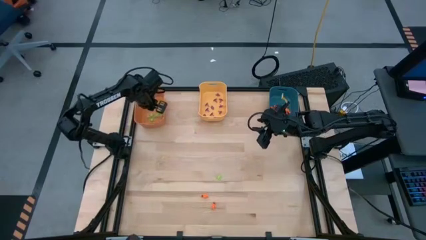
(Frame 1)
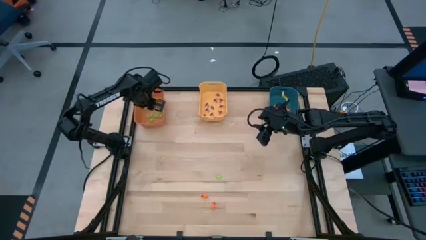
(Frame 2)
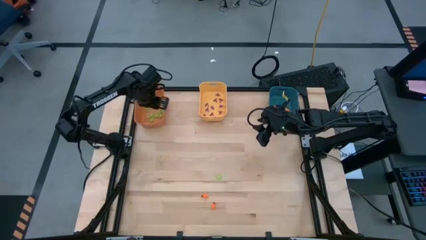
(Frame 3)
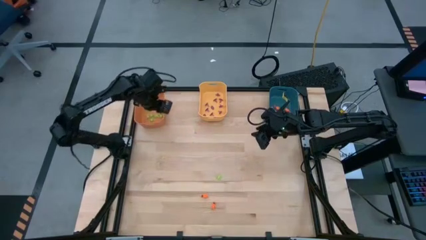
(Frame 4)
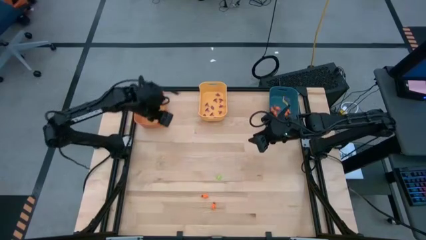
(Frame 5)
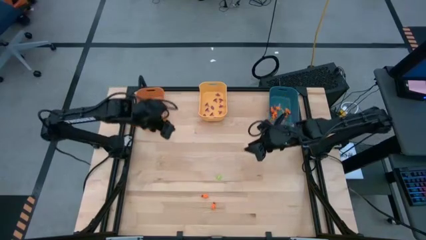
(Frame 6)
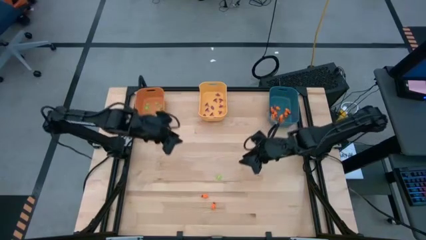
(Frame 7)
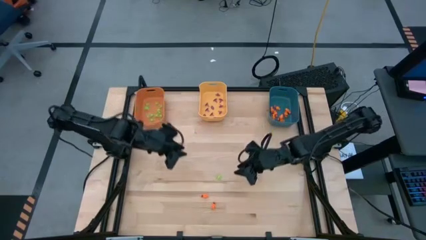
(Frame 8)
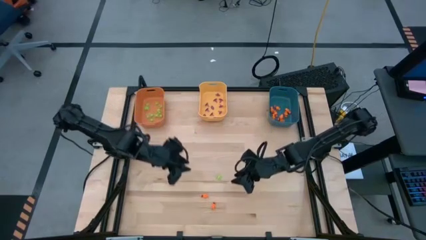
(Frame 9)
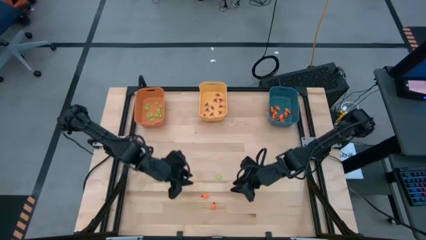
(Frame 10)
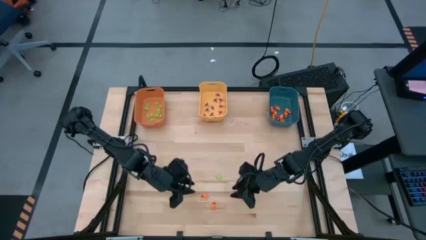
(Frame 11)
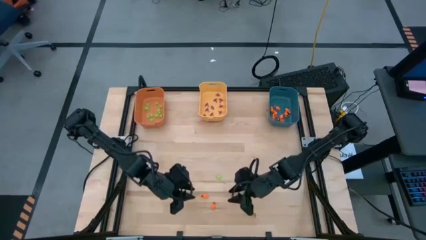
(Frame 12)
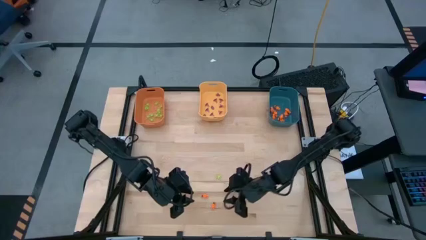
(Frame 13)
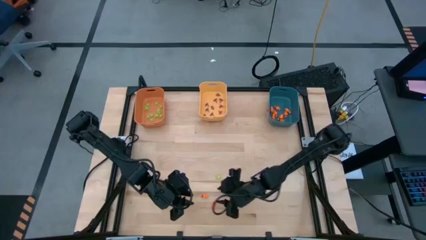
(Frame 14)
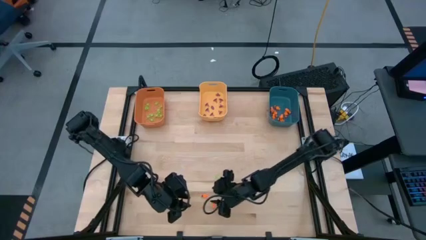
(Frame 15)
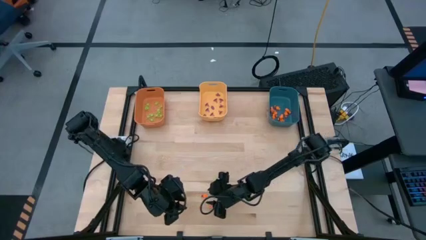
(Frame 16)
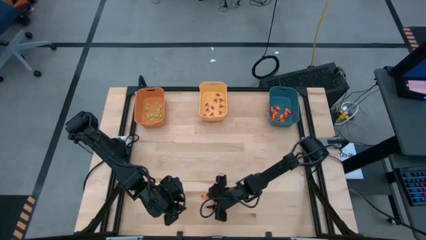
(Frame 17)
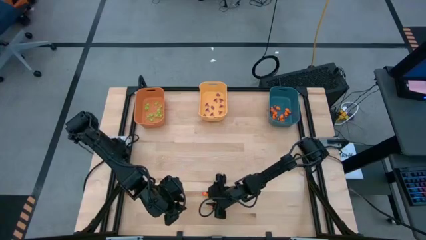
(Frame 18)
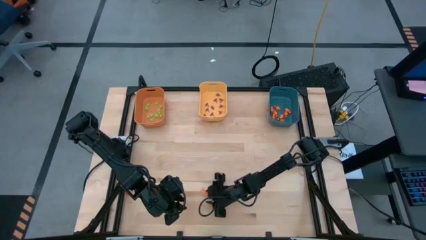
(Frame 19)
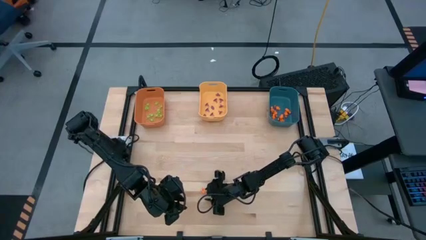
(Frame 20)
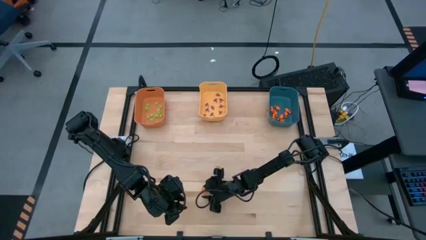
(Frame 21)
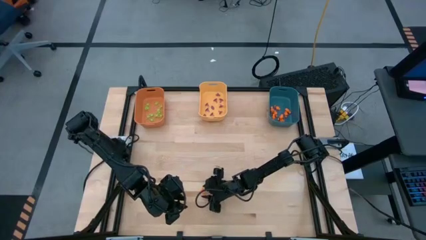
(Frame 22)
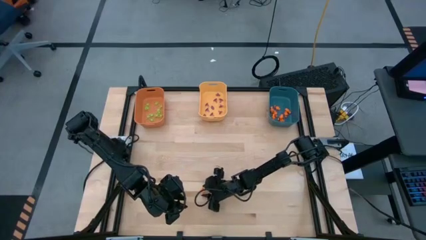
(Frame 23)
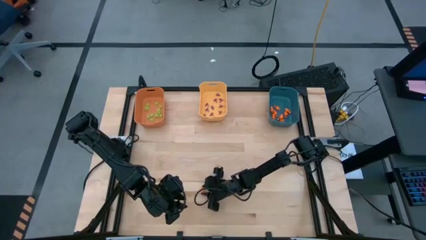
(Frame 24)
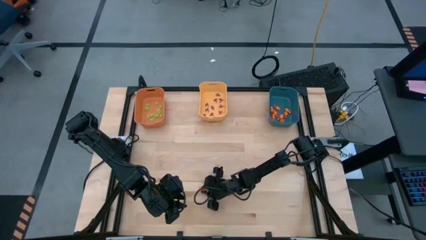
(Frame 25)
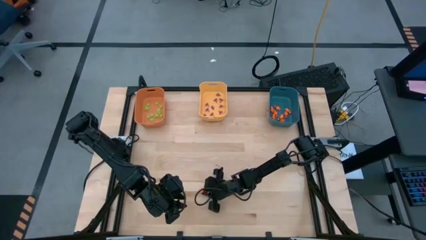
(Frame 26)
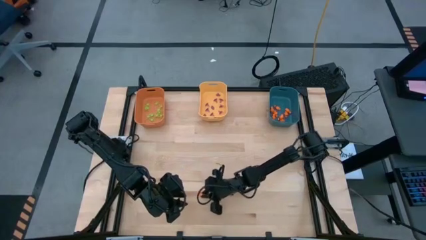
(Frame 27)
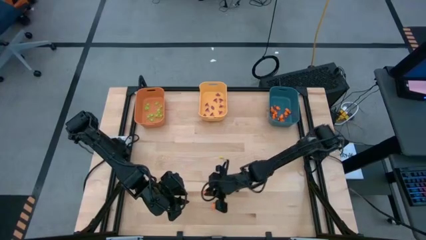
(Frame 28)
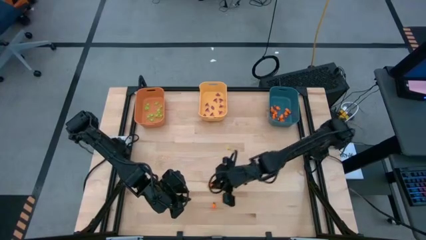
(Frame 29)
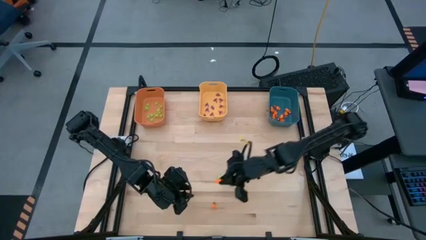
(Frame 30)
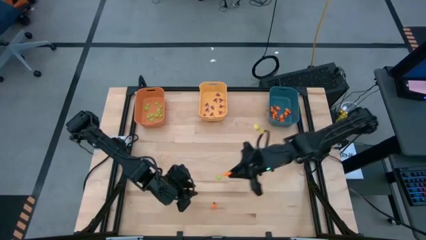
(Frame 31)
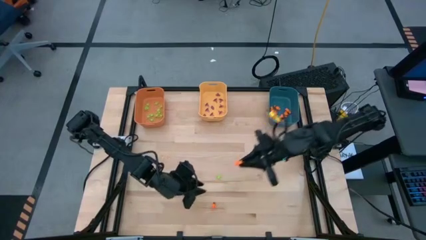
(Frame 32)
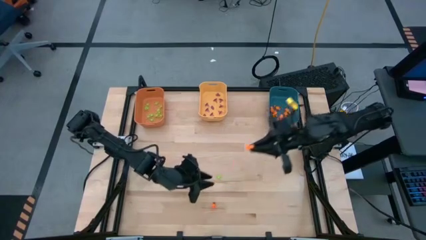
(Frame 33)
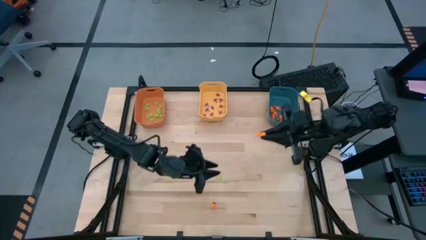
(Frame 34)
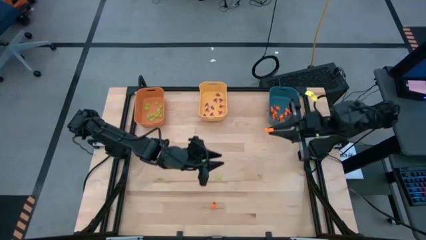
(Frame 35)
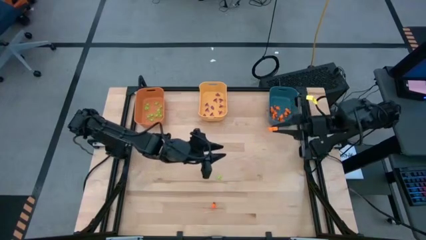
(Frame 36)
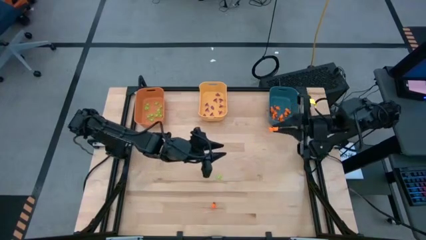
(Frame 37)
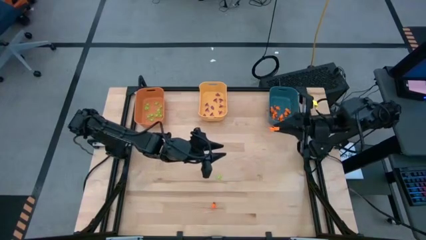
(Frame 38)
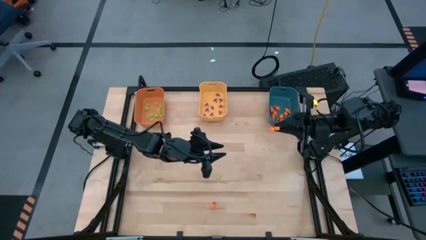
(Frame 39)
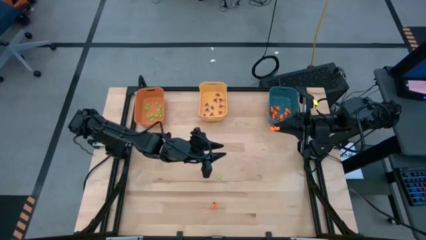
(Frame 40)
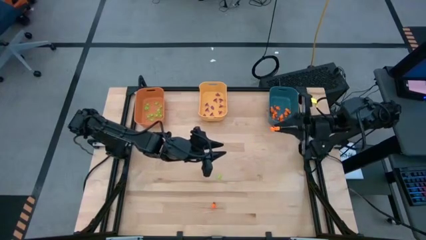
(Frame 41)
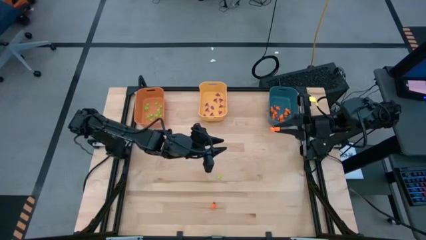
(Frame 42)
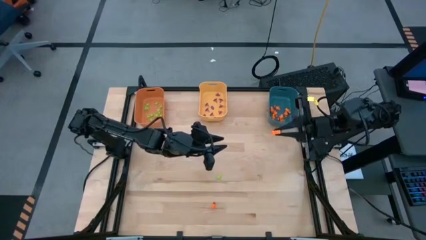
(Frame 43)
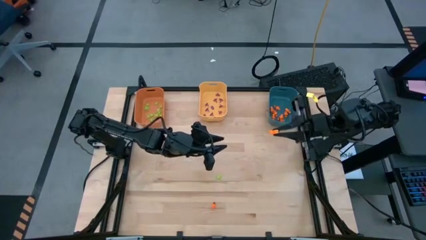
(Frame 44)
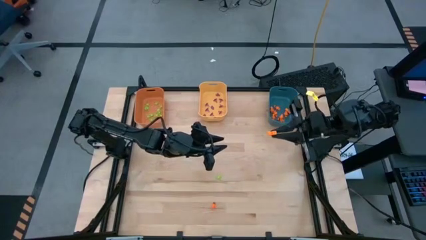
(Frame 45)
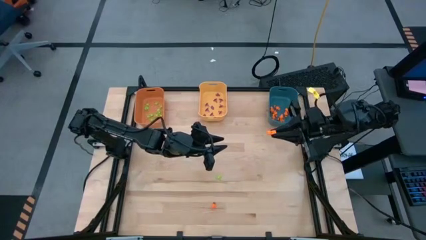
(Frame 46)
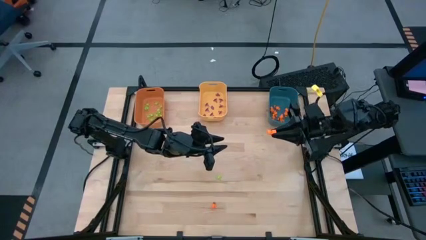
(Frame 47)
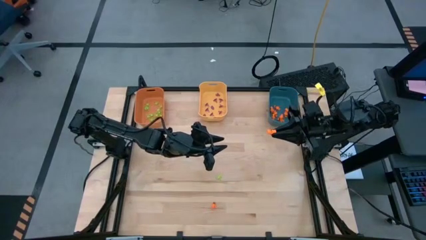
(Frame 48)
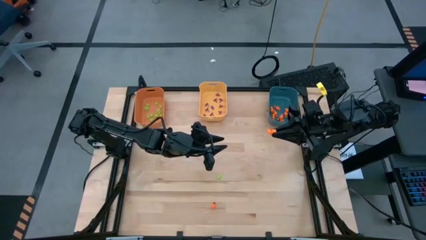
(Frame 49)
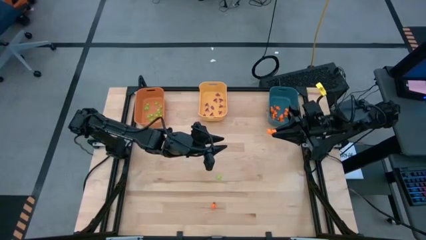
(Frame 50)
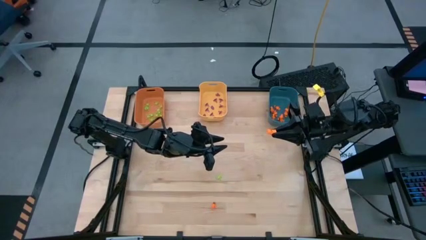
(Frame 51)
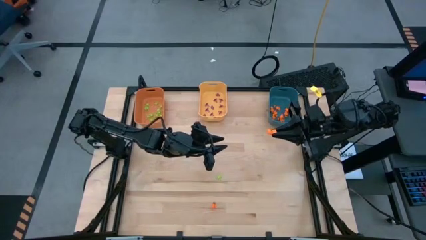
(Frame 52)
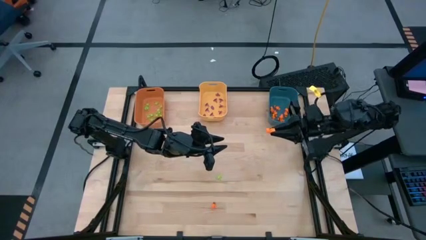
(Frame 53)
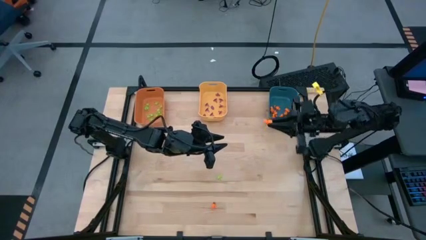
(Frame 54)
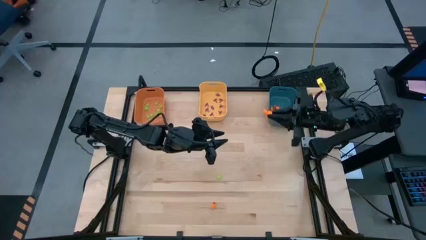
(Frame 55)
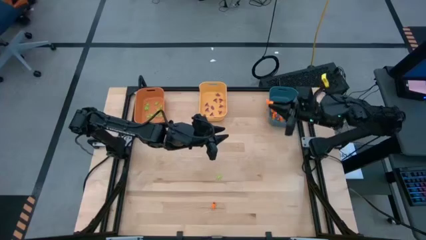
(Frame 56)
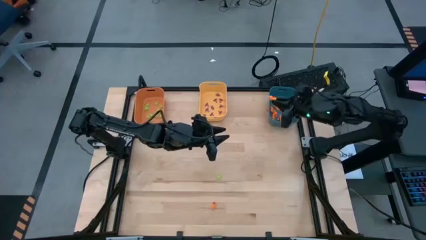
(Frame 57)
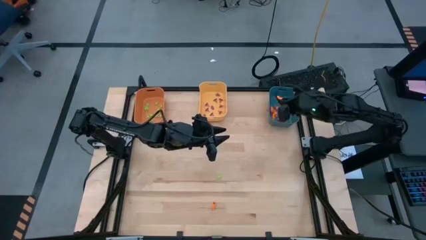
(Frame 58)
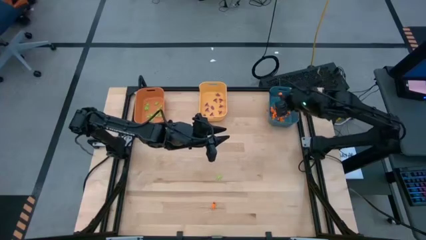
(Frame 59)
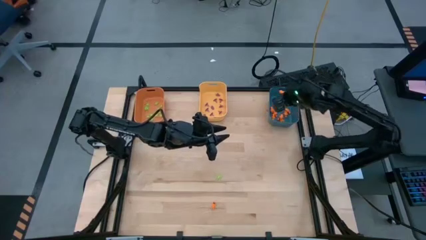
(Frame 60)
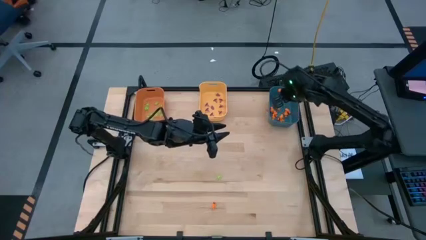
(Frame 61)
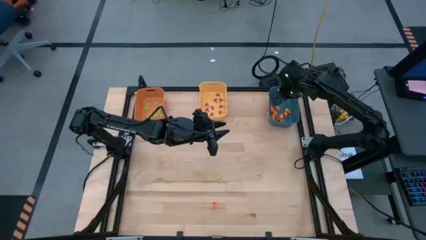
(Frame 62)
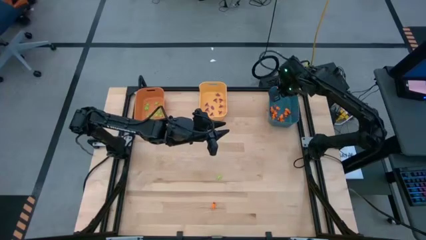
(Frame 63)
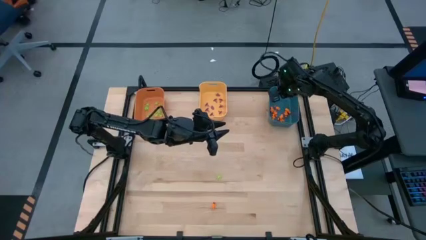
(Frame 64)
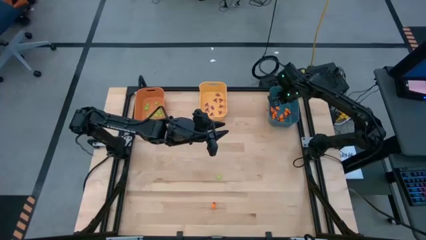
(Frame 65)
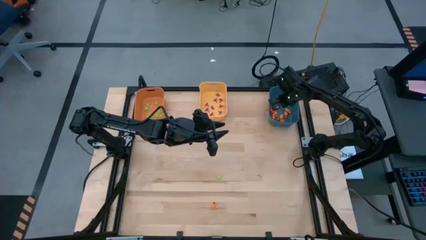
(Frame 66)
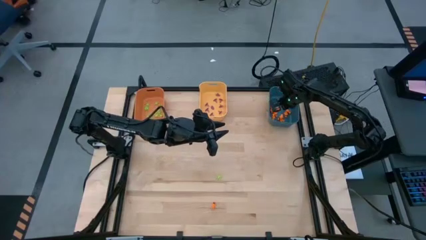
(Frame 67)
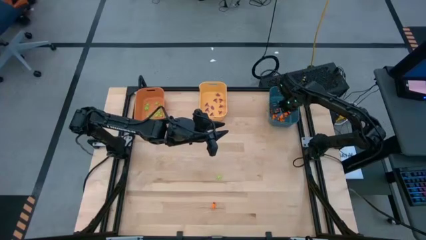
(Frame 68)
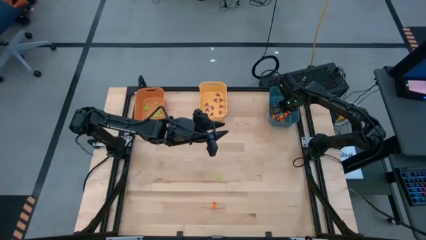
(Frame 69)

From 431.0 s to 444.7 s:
Task: Sort Halloween decoration
Put the orange skeleton toy into the blue bin

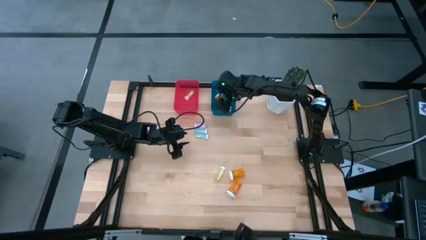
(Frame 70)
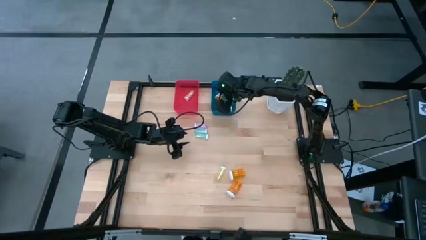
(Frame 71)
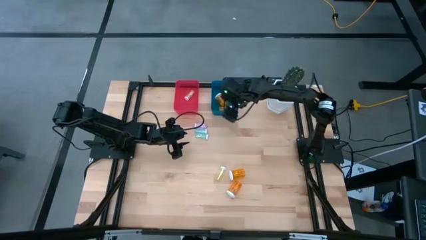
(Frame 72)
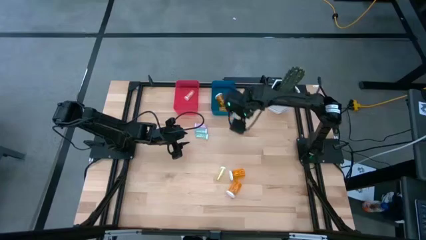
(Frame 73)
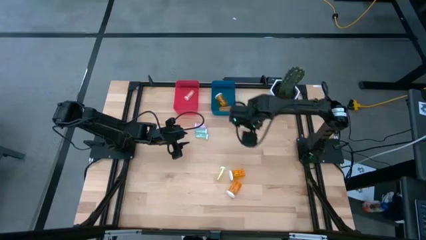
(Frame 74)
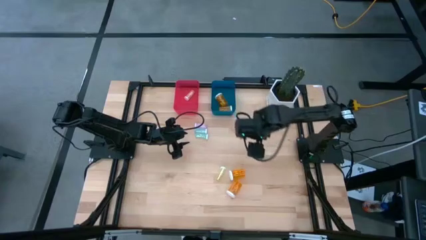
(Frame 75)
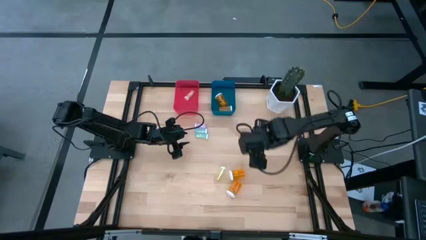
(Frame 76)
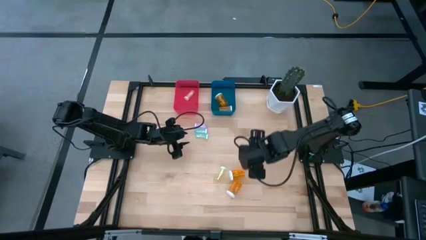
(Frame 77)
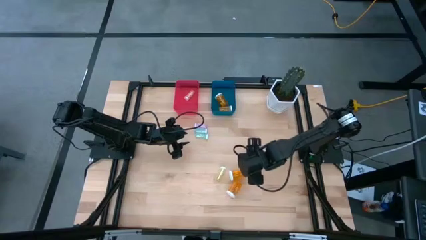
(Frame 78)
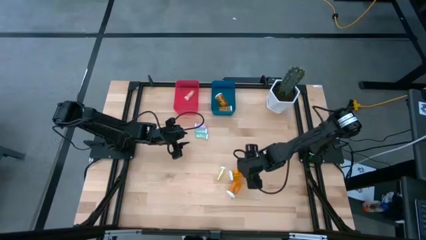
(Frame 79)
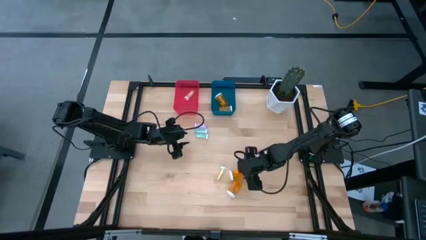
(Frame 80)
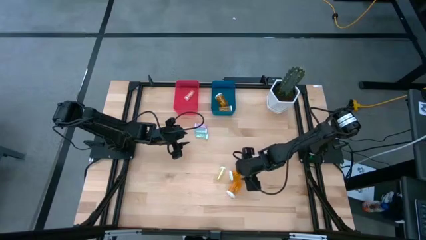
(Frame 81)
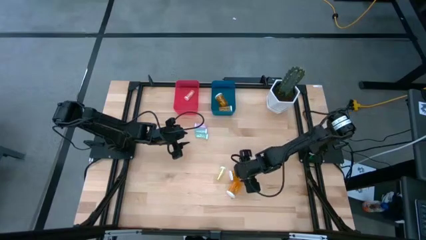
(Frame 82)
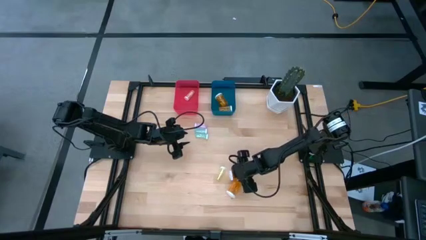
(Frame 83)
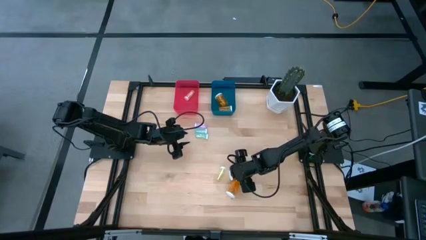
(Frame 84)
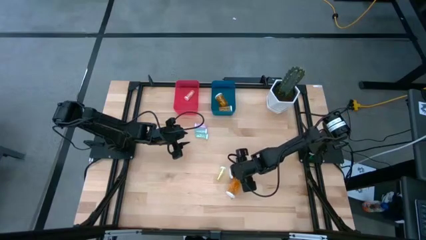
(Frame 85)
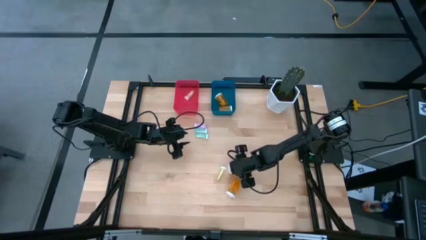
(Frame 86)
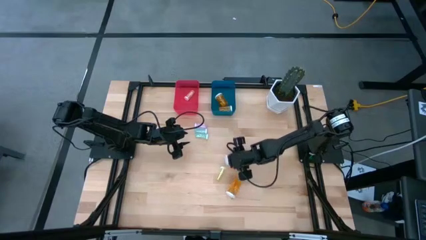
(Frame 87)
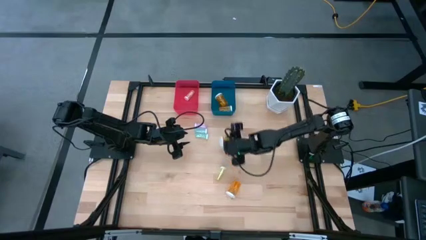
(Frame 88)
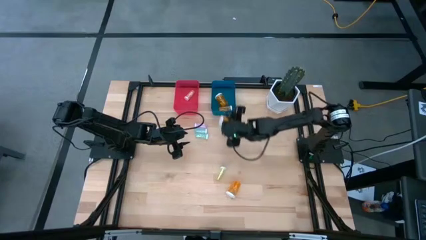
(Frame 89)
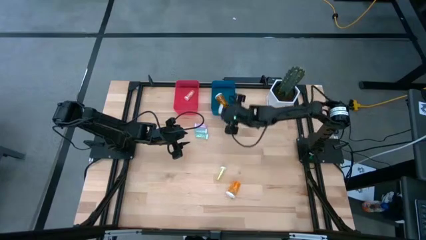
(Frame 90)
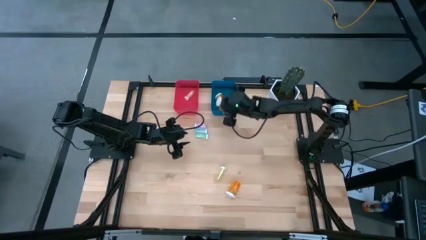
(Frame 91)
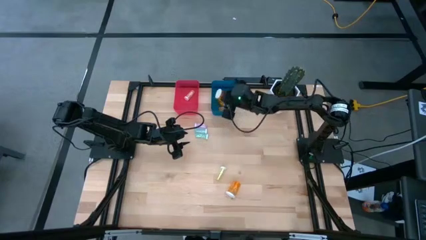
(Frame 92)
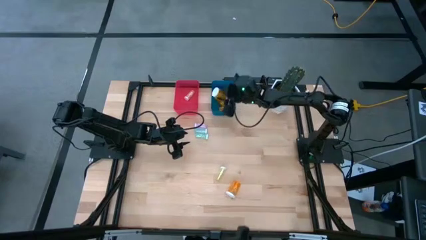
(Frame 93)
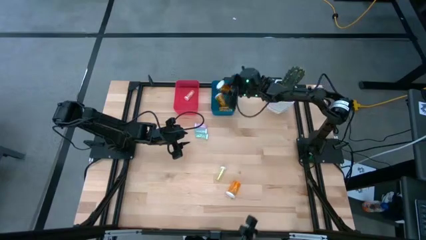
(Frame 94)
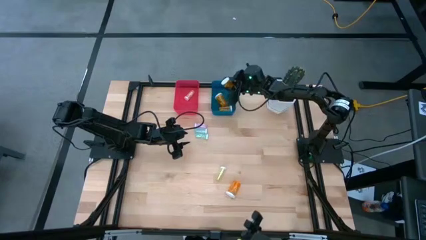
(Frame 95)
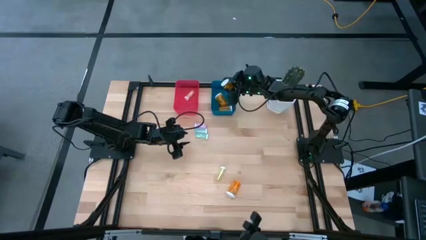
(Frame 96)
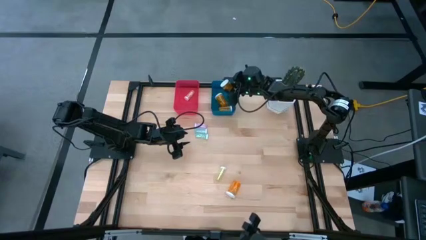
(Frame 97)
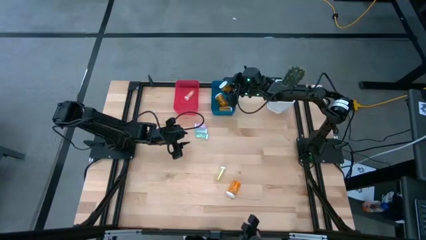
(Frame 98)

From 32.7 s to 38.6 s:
Task: Pick and place medicine bottles into bin by pill shape (circle, oval)
Put the orange capsule bottle into the blue bin
